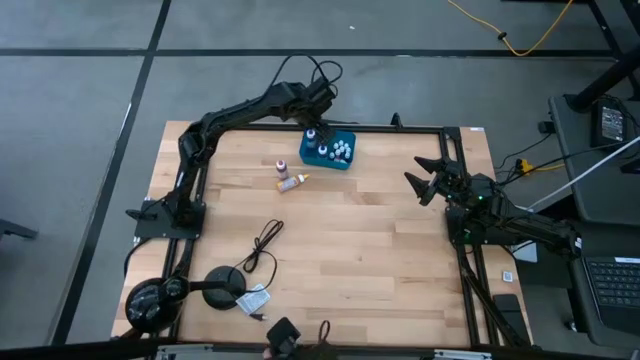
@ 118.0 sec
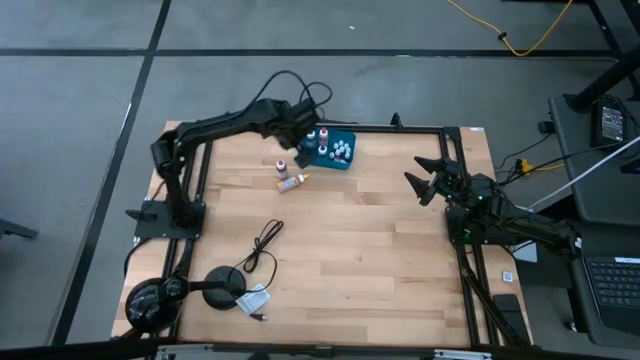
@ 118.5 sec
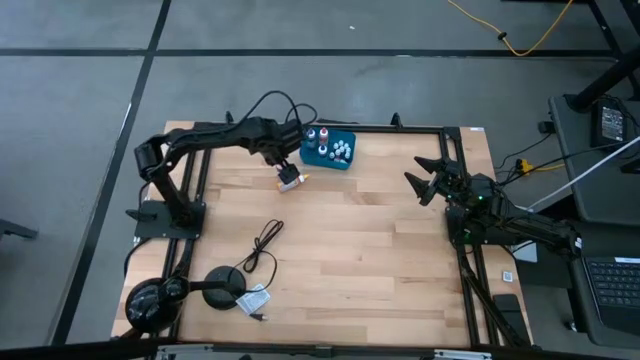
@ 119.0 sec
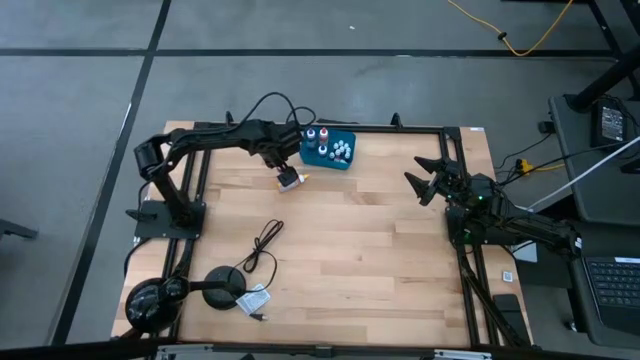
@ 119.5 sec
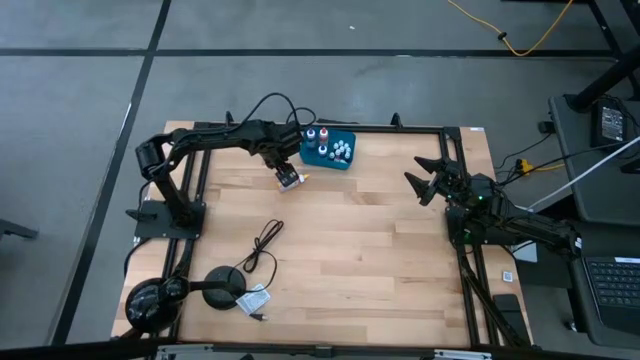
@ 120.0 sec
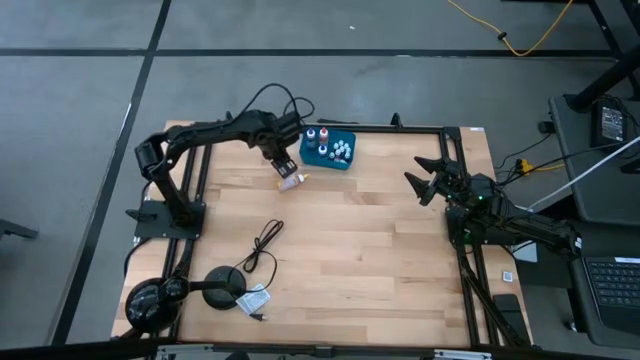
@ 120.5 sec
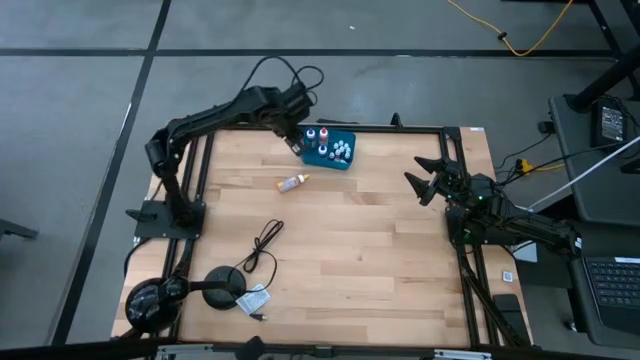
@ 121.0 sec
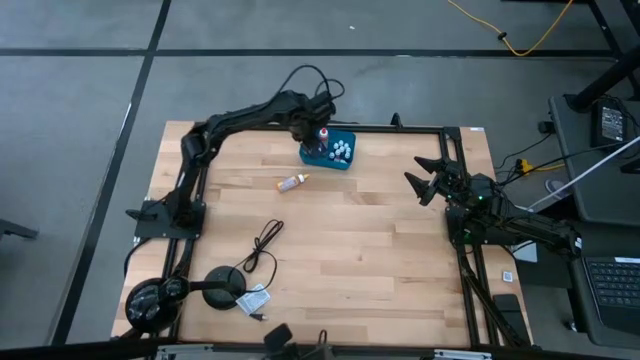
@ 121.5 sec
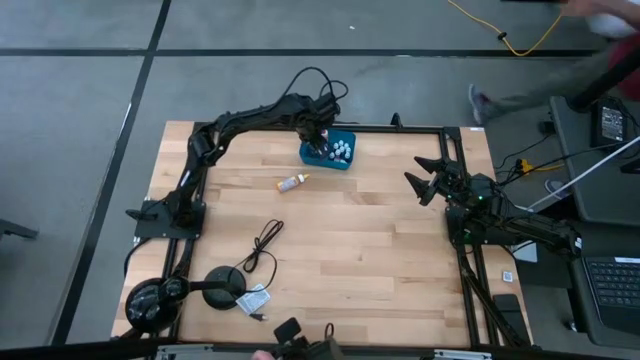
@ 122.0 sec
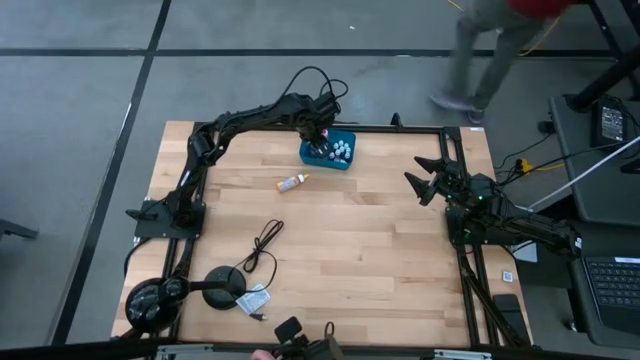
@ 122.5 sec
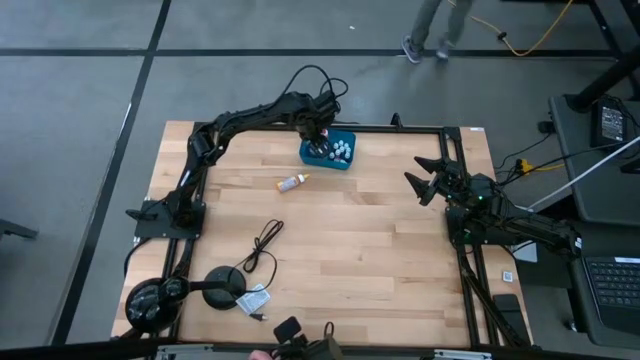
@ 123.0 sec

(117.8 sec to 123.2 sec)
Task: Pick & Place food coloring
Put the large red food coloring bottle into the blue container

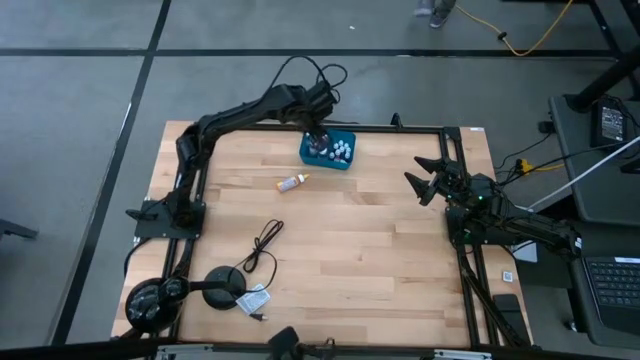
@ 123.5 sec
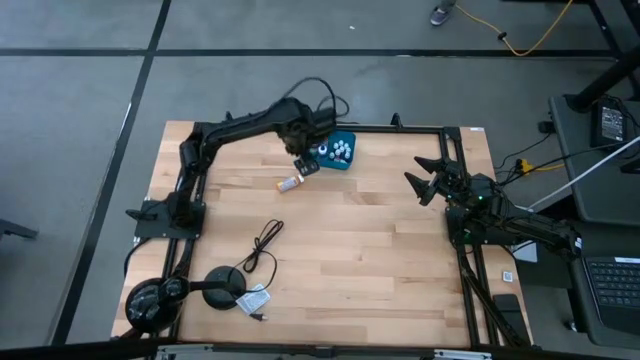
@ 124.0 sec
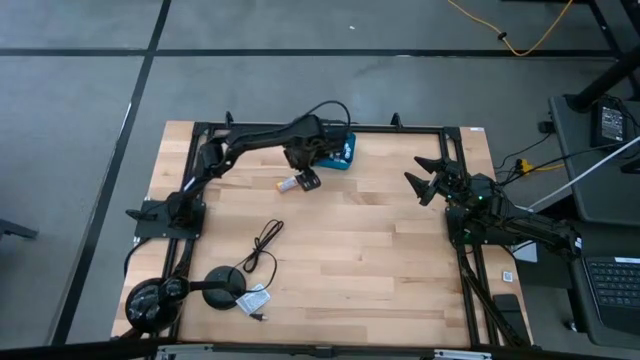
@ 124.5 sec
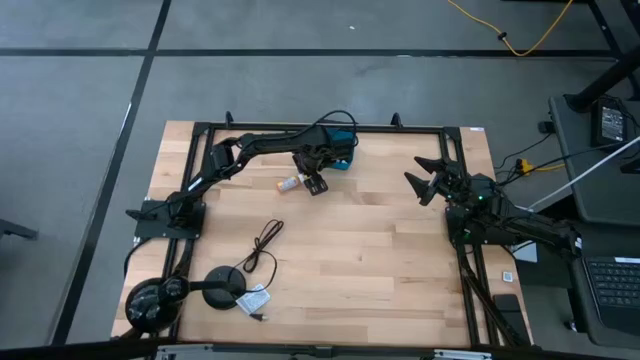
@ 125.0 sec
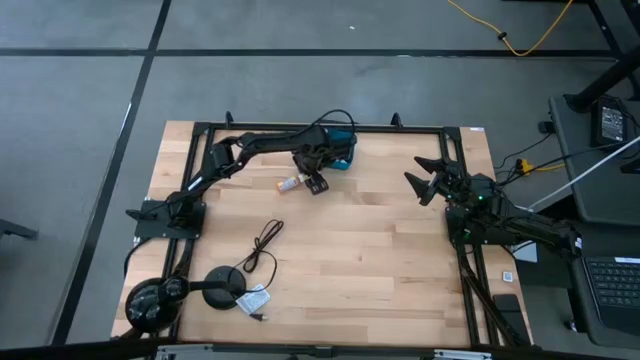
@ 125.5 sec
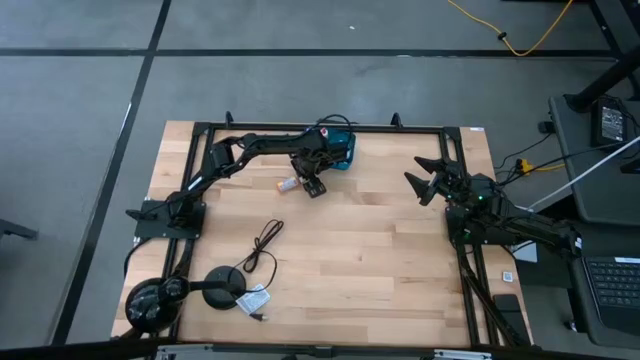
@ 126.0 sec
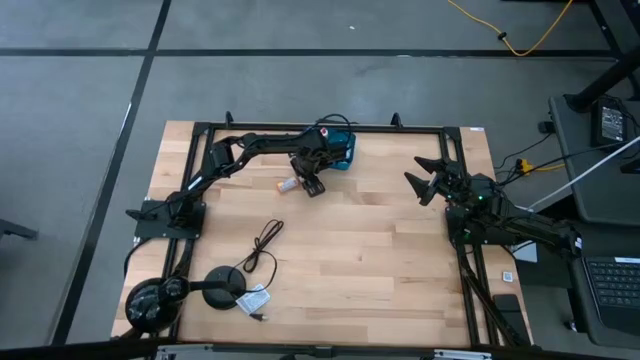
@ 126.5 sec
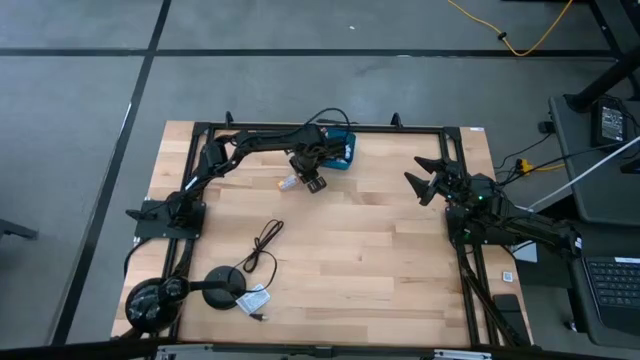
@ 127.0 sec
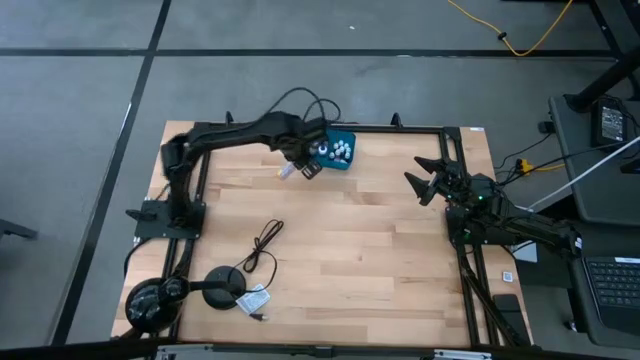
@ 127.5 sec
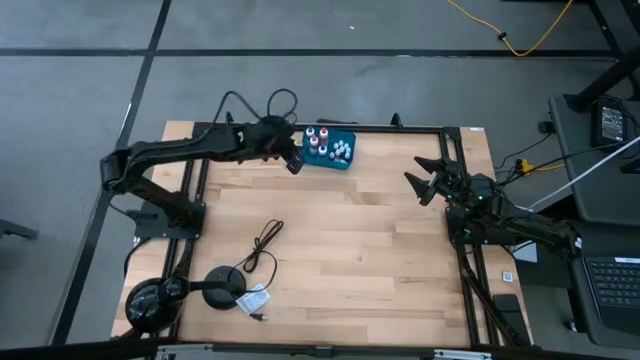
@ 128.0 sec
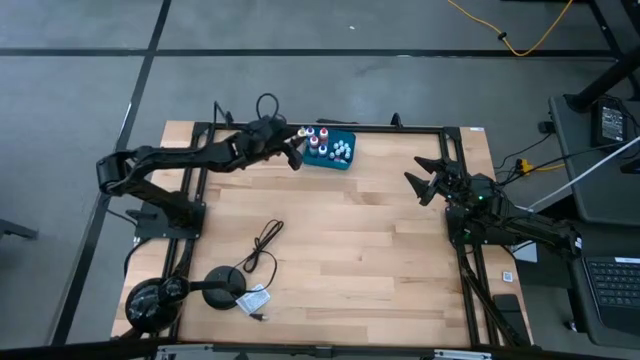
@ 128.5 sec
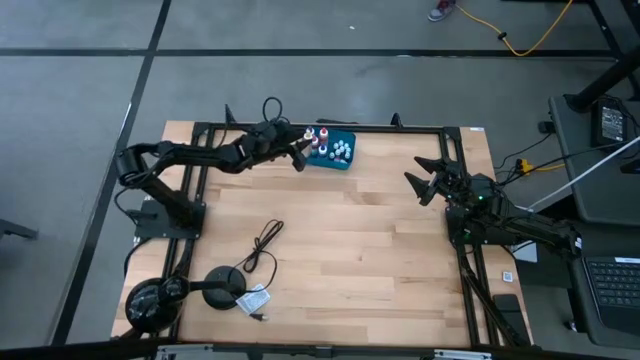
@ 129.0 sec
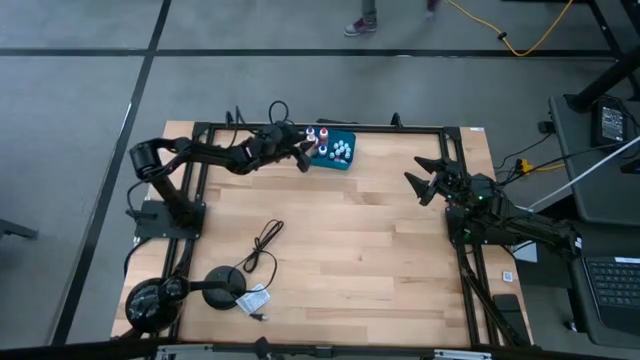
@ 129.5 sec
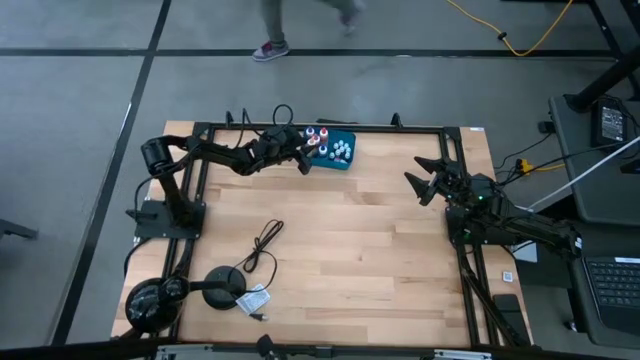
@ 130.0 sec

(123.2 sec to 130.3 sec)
Put the large yellow food coloring bottle into the blue container

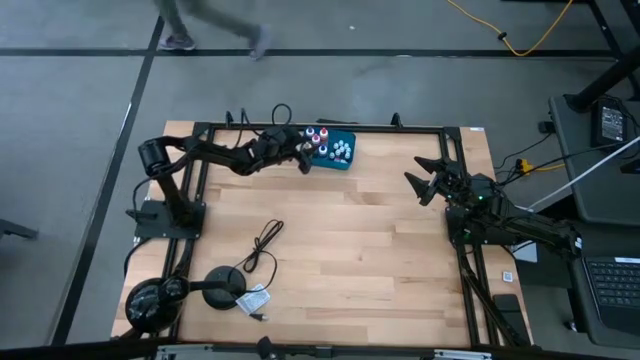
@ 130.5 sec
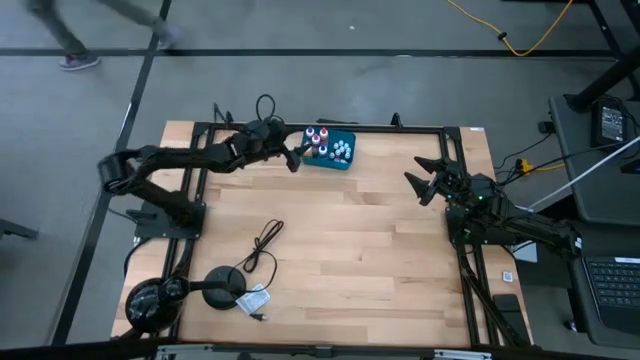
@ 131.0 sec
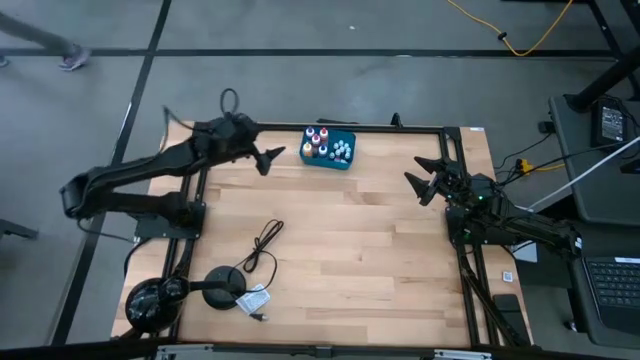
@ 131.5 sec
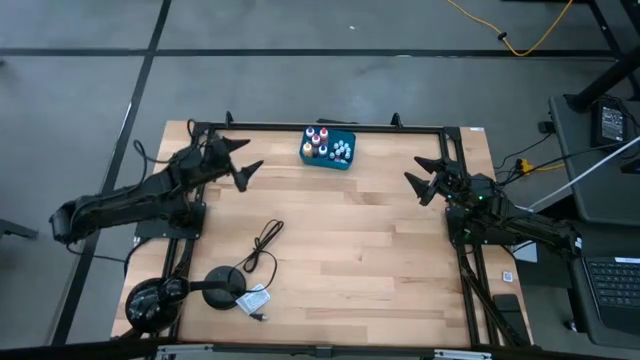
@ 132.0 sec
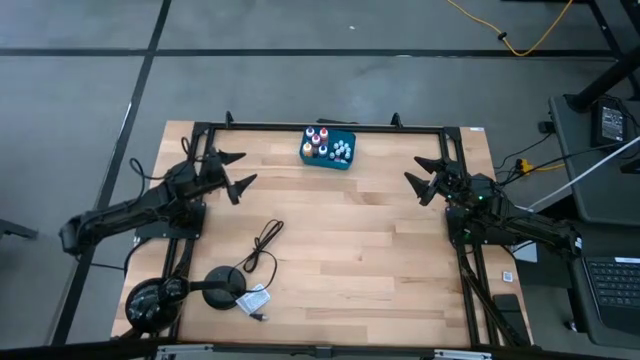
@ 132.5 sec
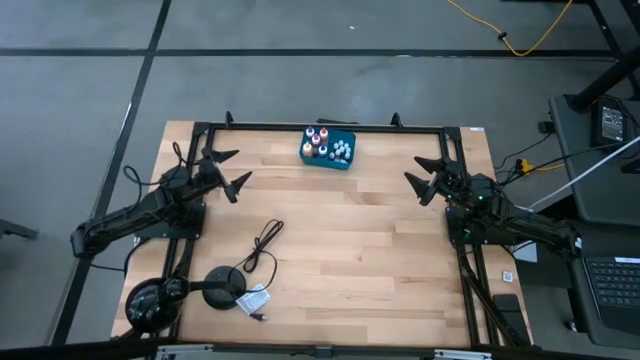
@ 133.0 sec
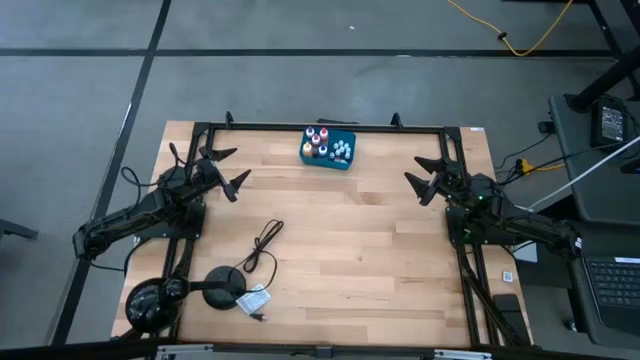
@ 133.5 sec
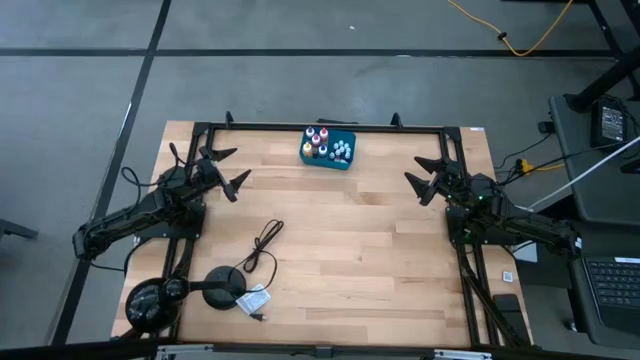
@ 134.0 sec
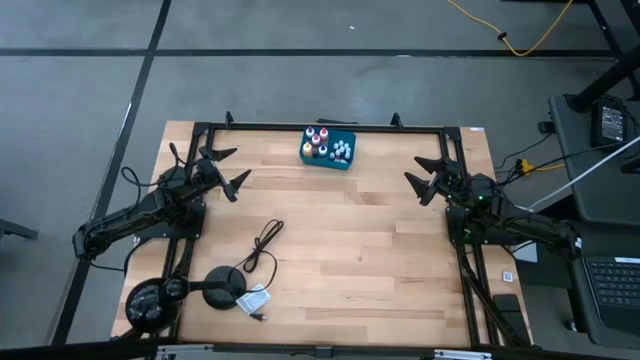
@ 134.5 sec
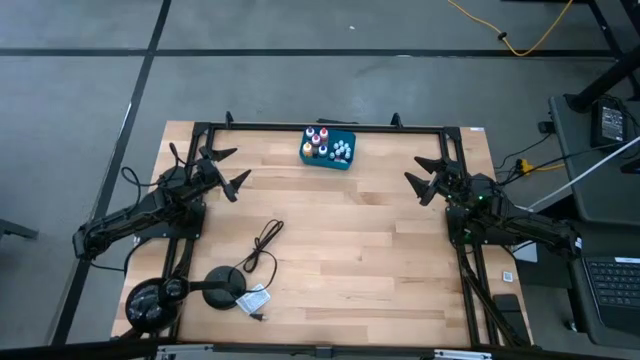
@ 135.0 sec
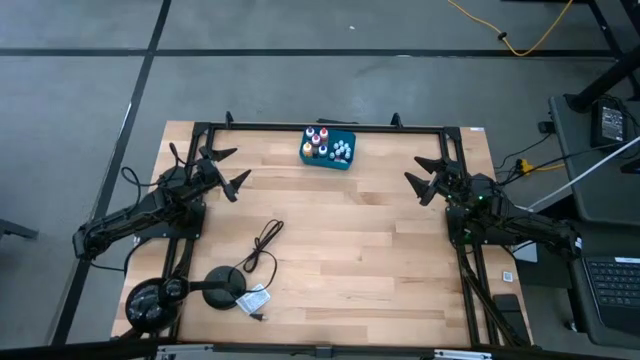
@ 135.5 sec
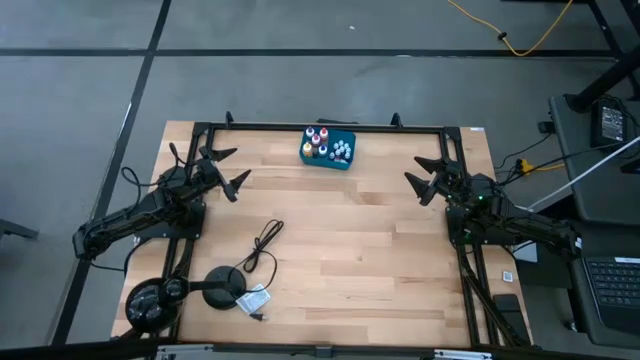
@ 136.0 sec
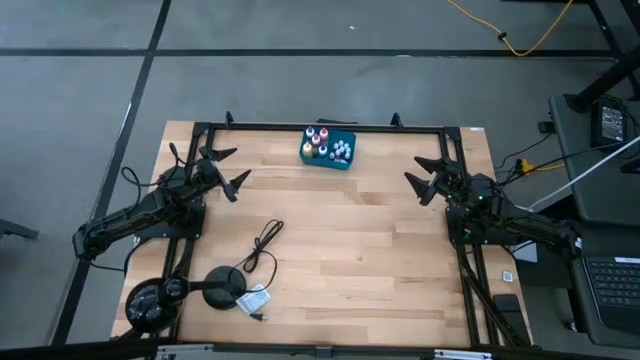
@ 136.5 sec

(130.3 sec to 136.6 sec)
Return to Home Position

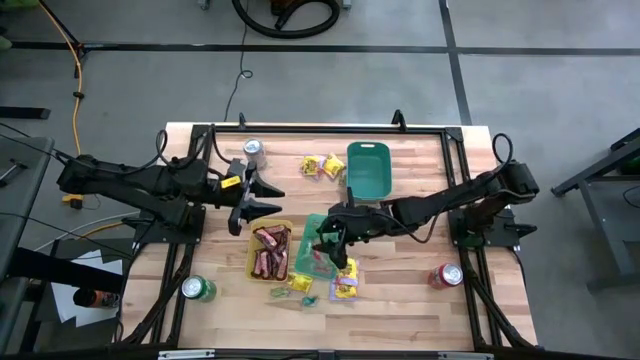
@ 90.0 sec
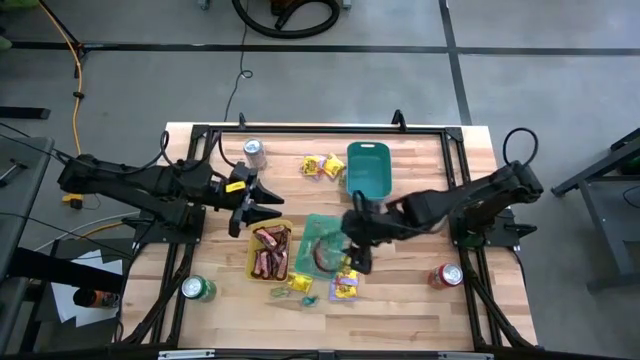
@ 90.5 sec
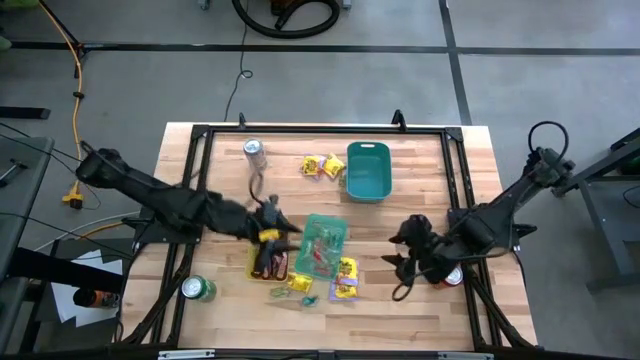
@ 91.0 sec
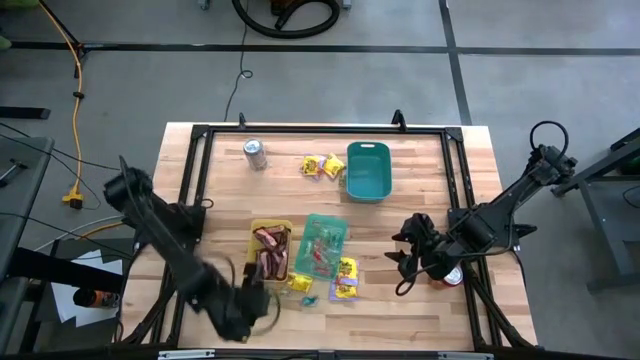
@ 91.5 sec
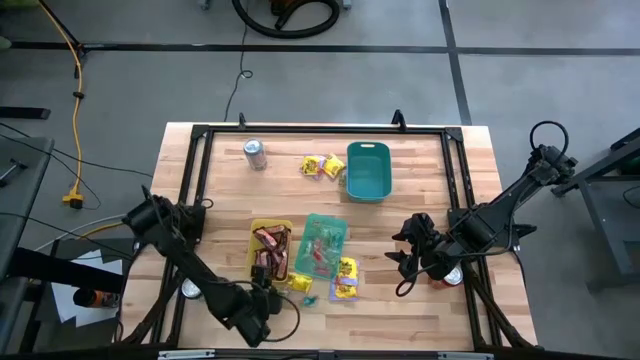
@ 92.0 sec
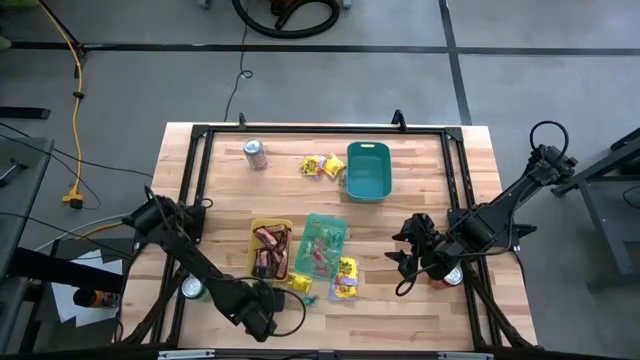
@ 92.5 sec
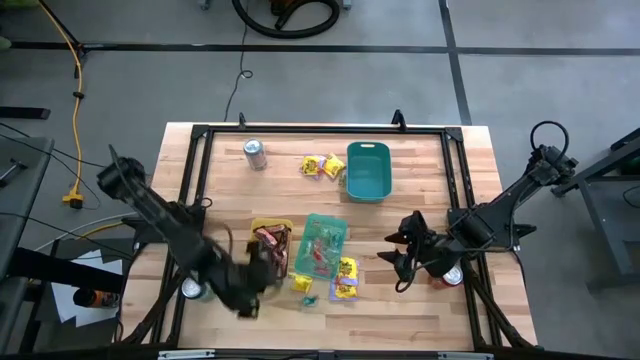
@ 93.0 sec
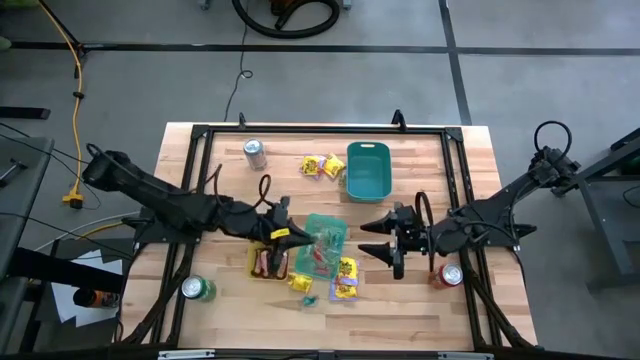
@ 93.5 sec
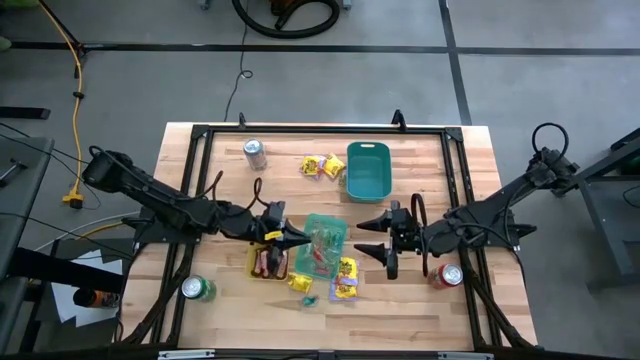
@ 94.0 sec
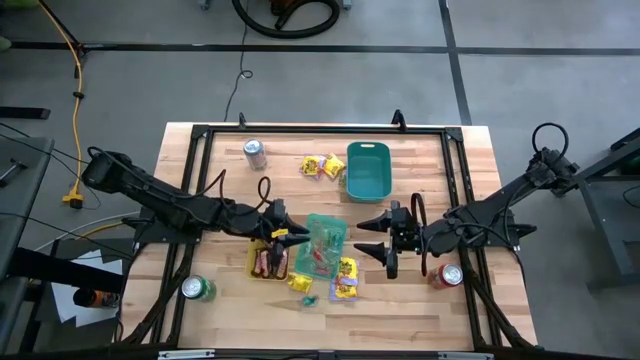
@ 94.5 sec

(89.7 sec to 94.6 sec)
Task: Sort candy
Put the green gummy into the light blue bin
